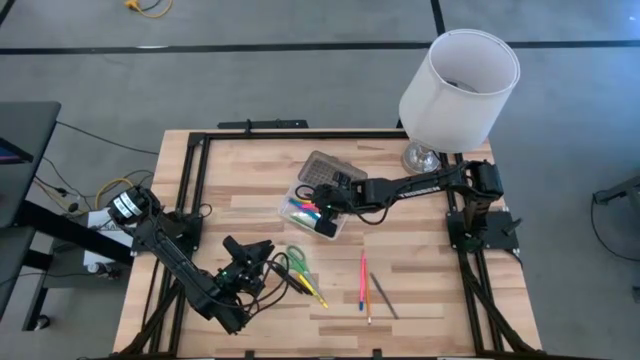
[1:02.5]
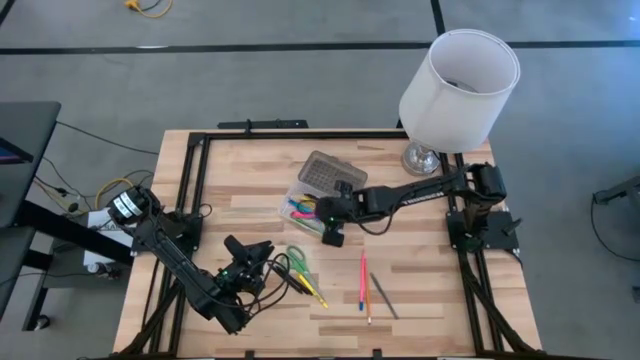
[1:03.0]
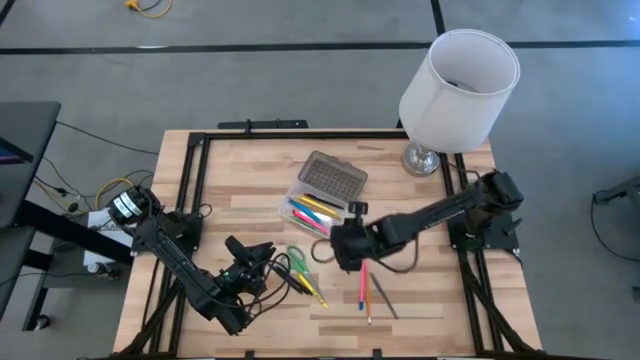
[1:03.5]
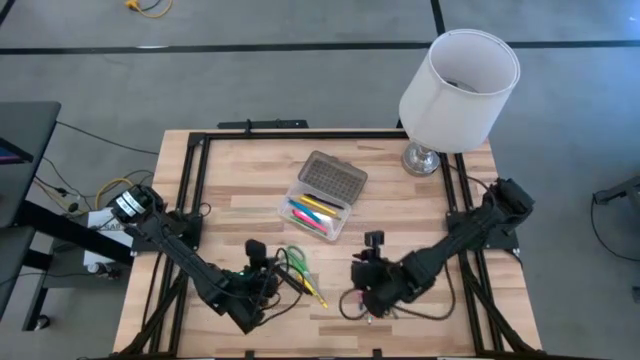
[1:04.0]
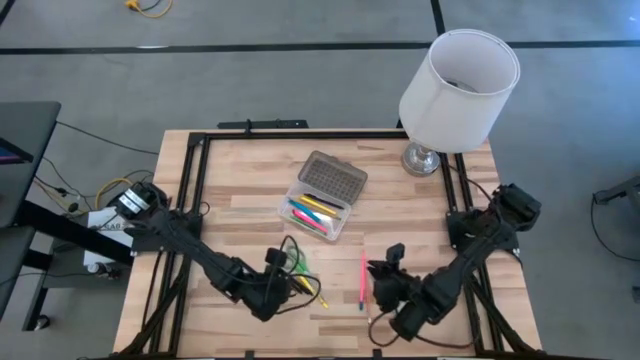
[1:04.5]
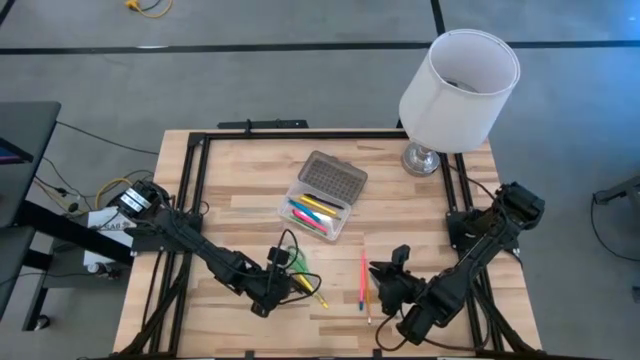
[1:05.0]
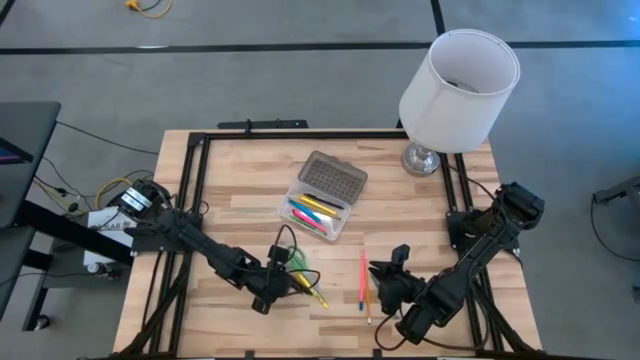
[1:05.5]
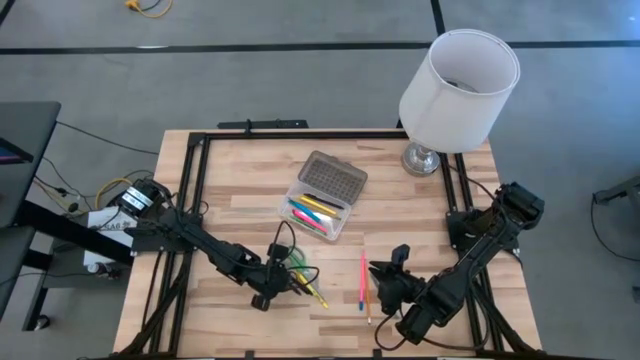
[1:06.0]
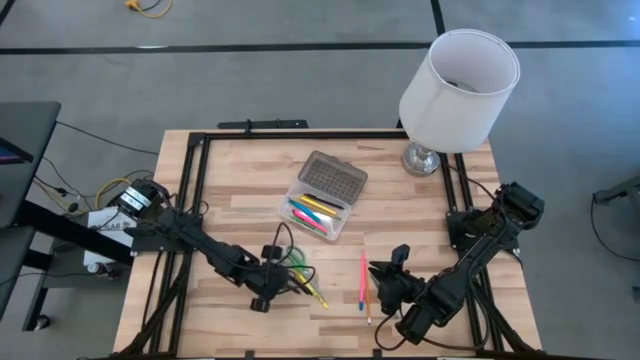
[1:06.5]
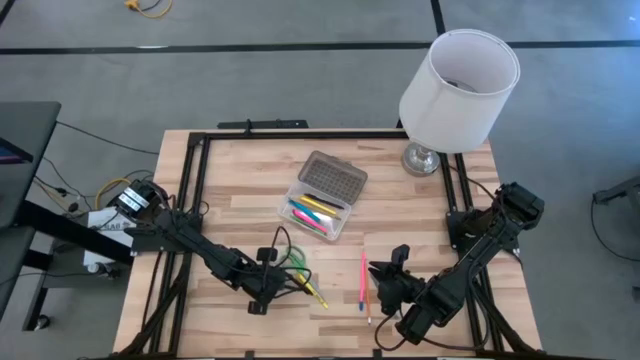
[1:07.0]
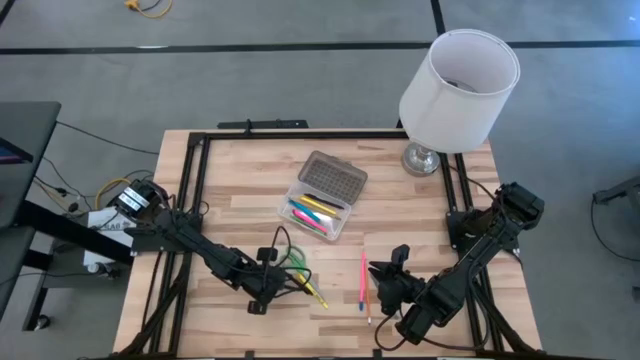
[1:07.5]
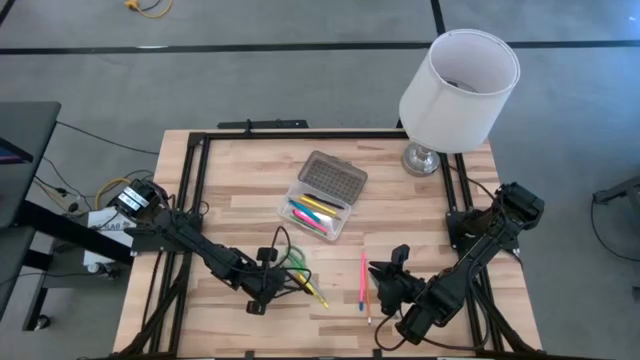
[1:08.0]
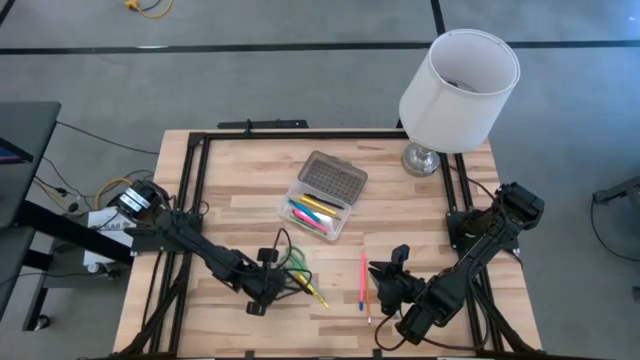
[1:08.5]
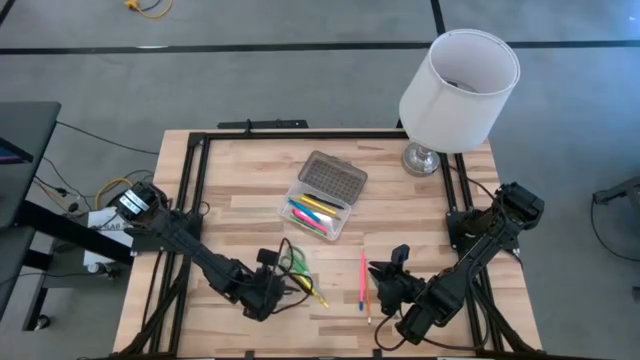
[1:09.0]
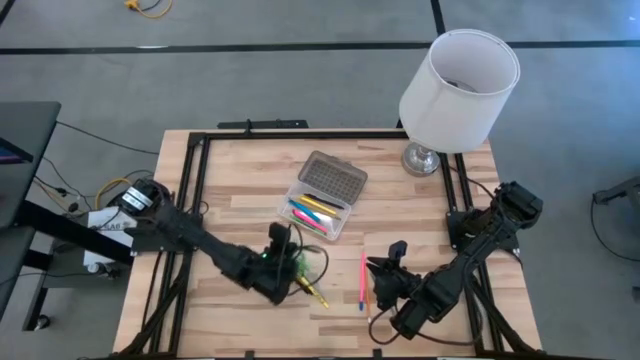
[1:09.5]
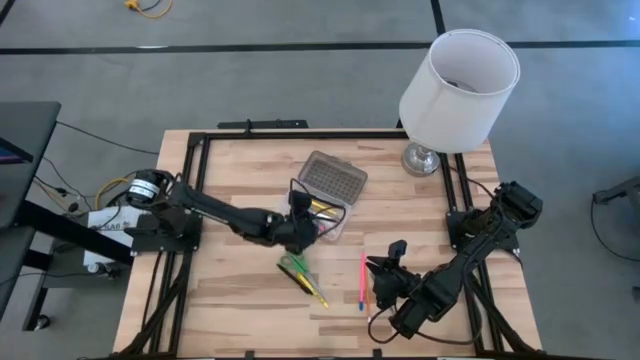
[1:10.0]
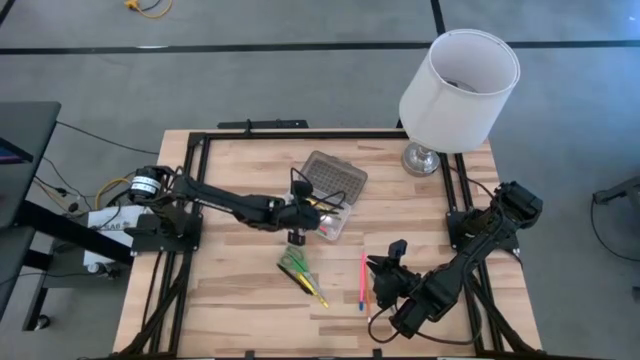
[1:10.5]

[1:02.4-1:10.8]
Task: Pick & place school supplies into a supply box
Put the left black pen into the gray supply box

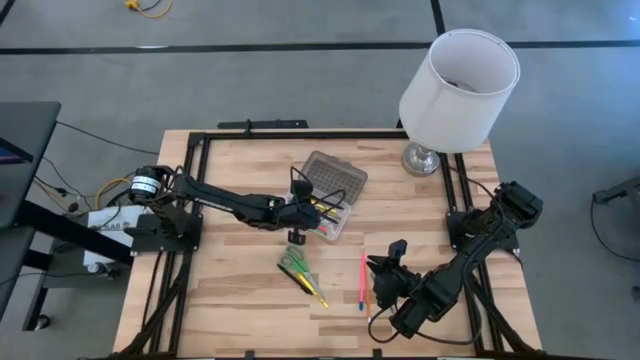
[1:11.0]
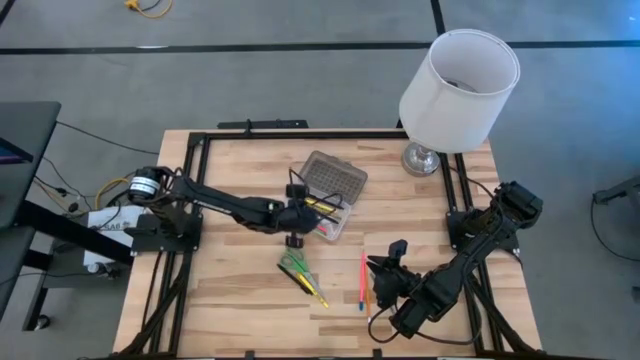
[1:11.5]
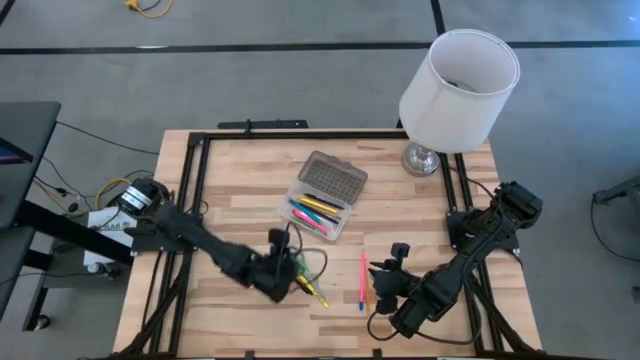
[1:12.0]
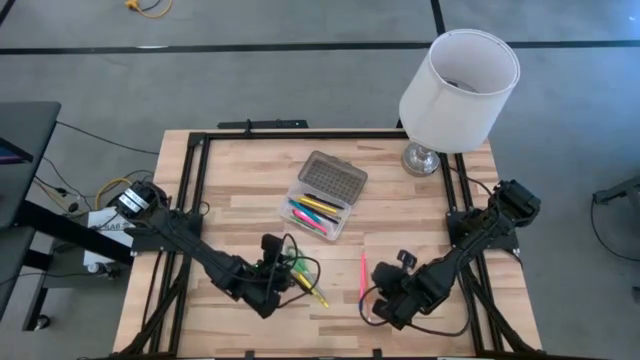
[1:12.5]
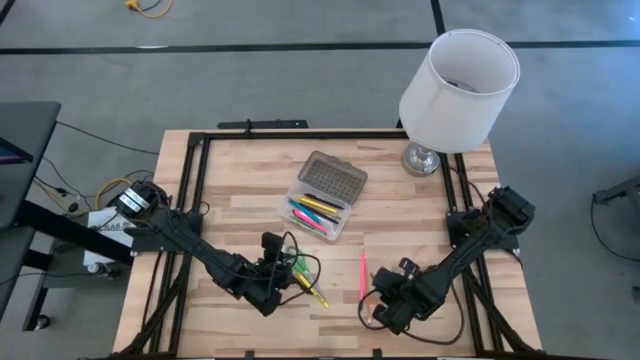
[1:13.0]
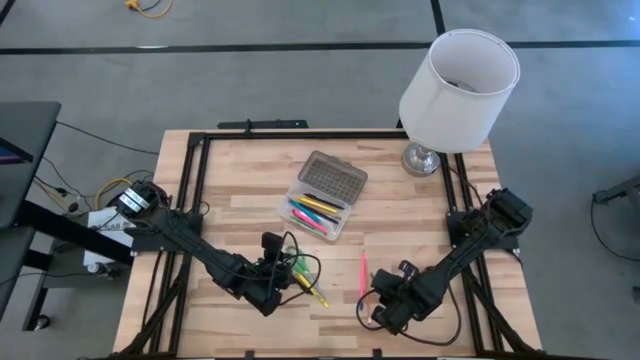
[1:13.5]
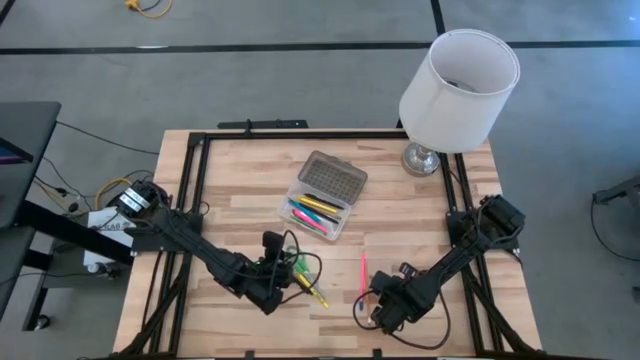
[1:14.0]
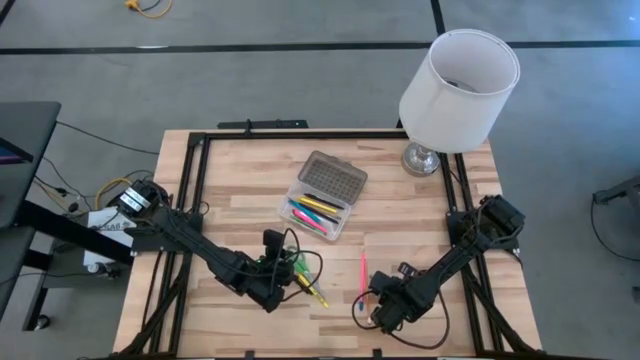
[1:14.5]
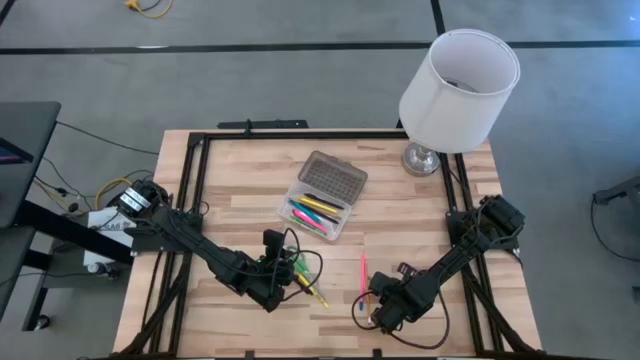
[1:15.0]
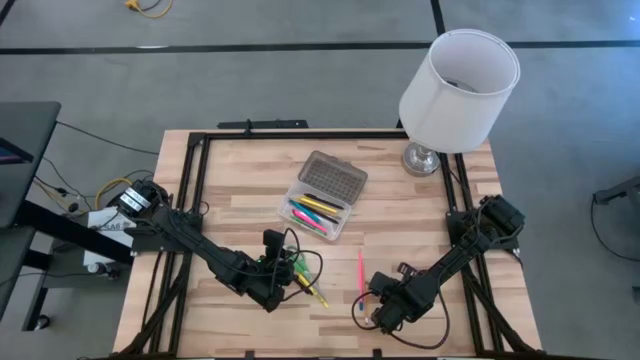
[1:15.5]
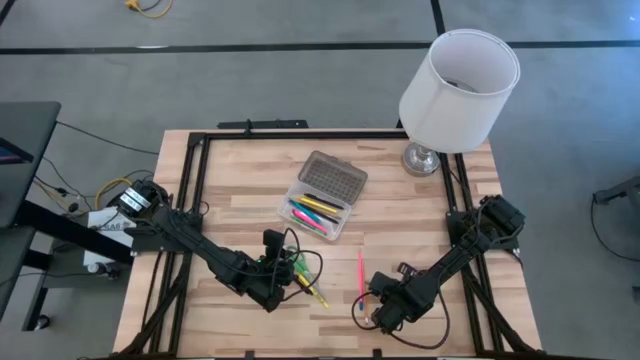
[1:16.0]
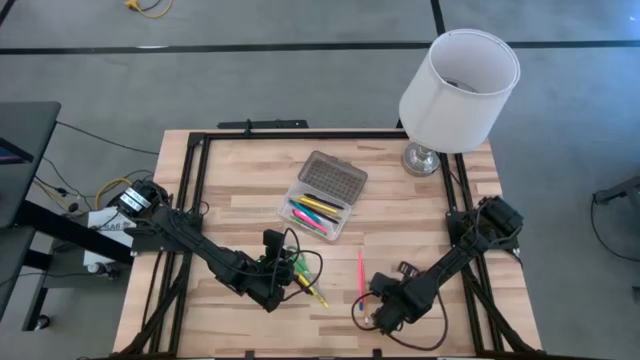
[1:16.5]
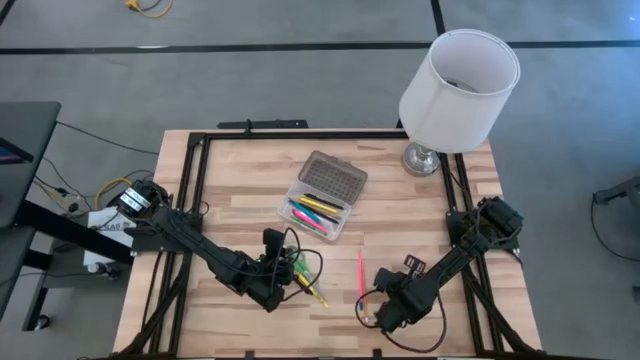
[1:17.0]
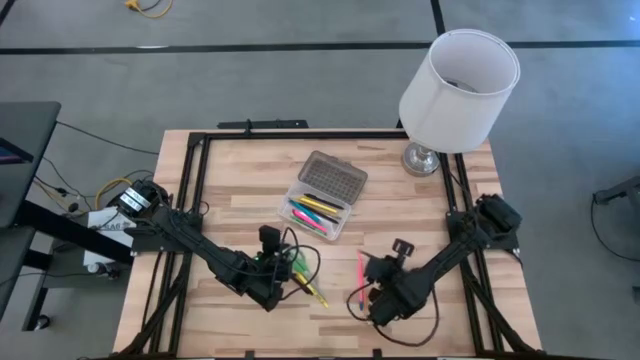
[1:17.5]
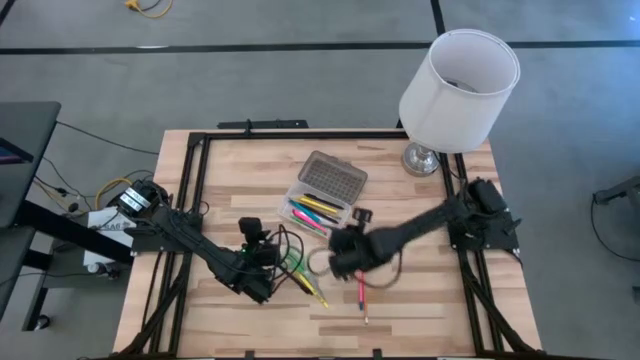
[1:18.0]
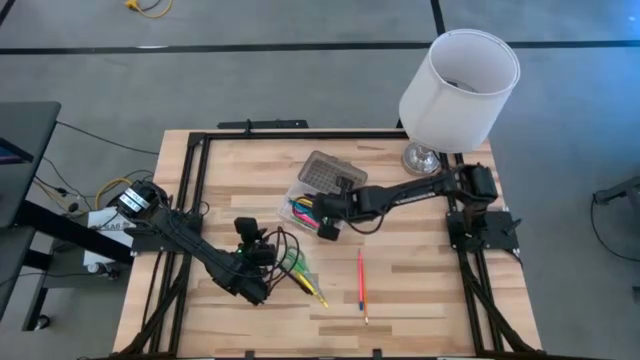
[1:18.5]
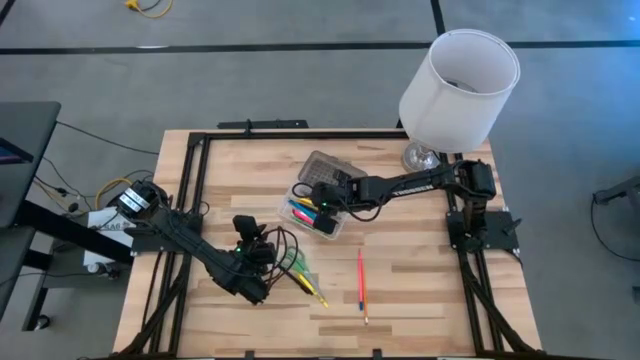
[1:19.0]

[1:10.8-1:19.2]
Put the gray pen into the gray supply box

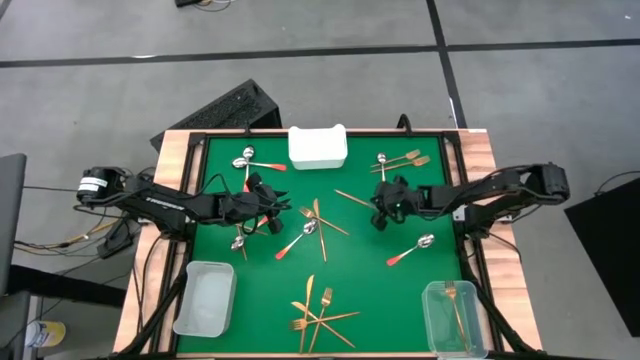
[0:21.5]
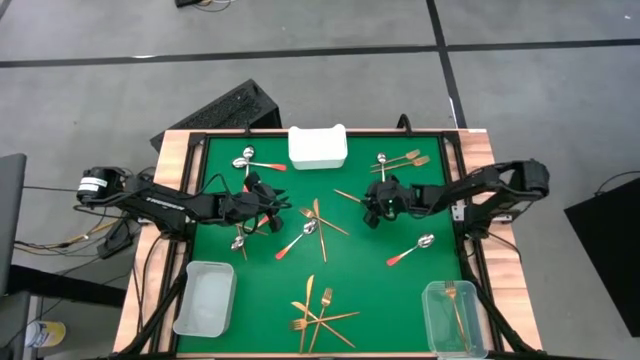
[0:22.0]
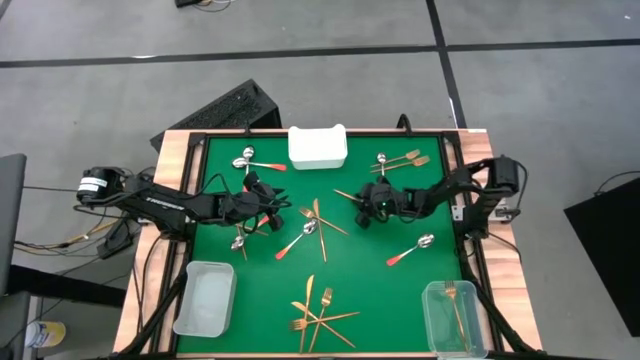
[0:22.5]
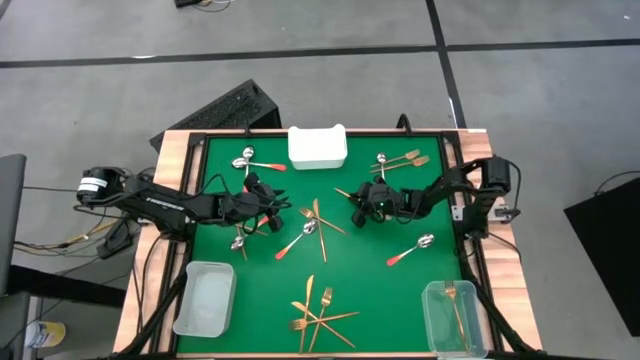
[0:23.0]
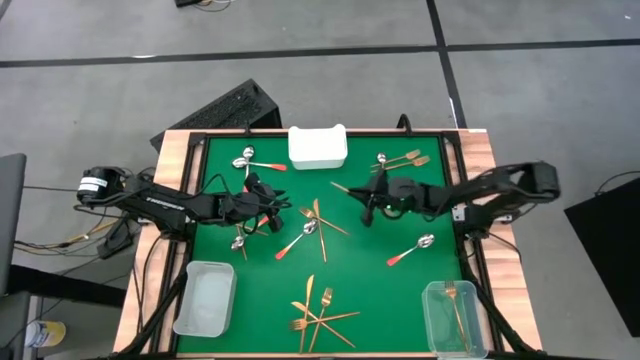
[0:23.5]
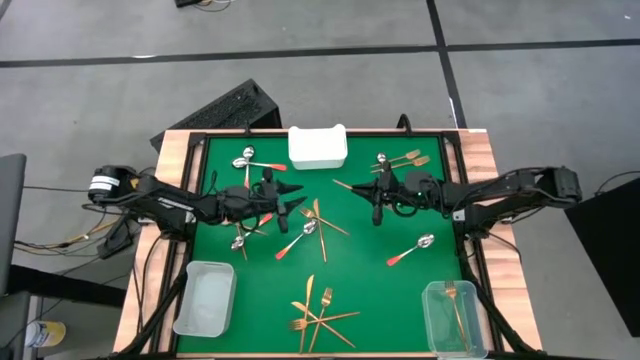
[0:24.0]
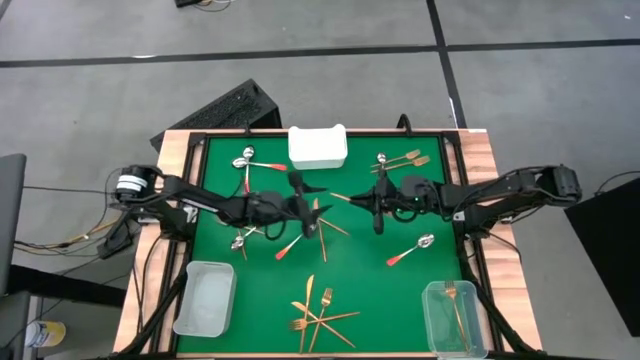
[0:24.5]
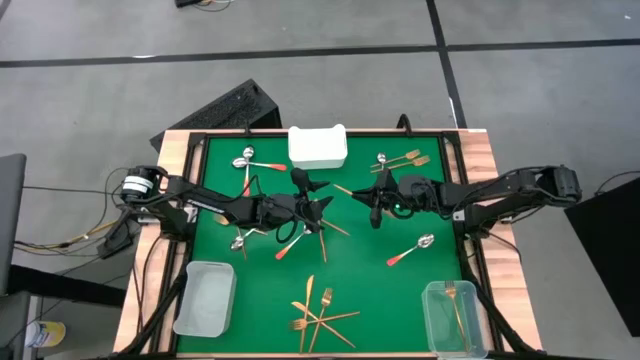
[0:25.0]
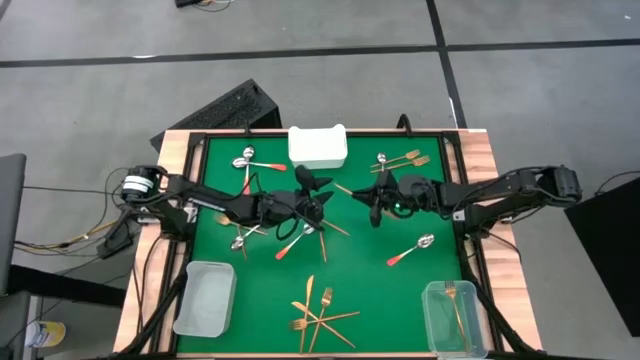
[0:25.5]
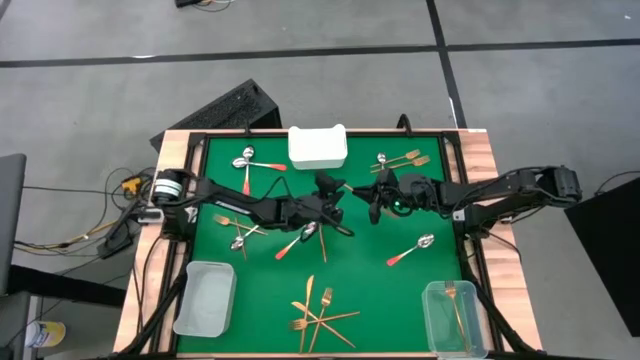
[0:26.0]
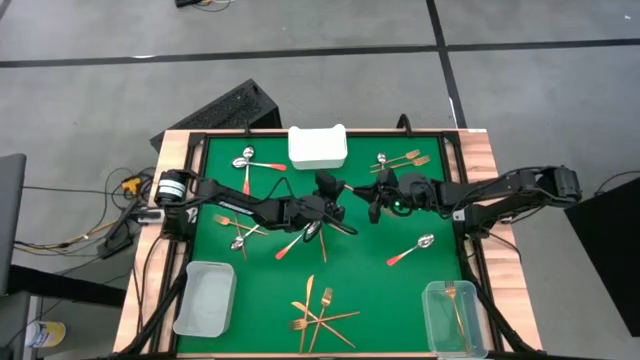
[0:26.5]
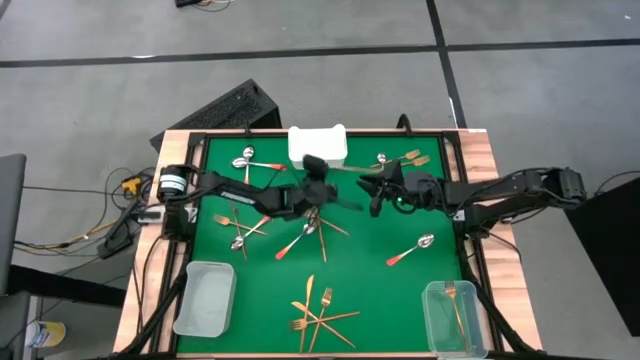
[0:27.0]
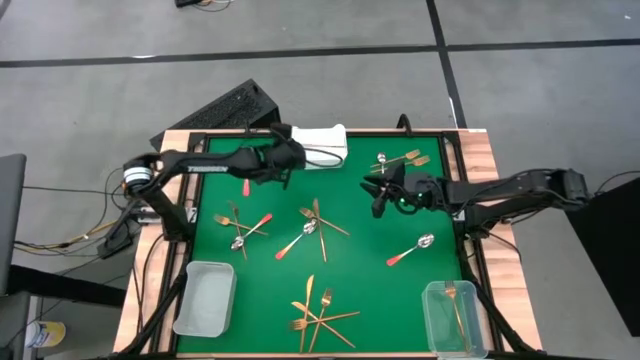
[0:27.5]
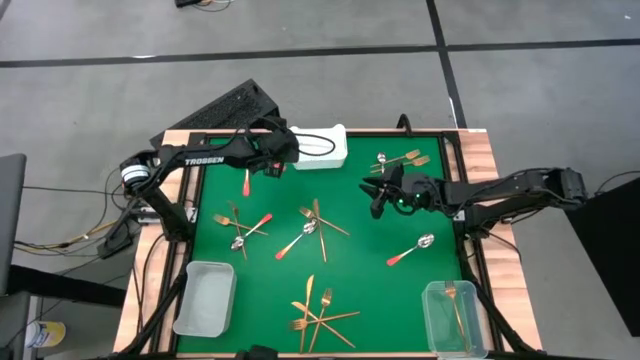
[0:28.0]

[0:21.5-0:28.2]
Task: Sort silverware by color (type)
Put the gold table knife into the white bin
